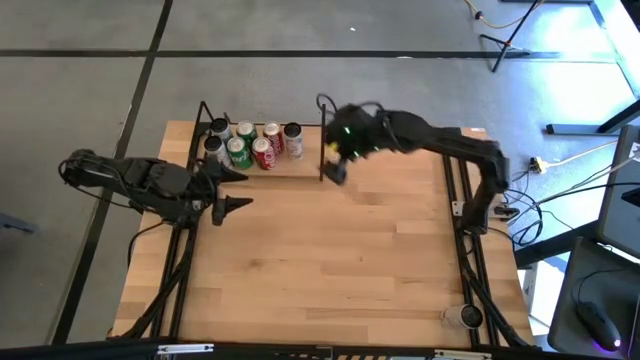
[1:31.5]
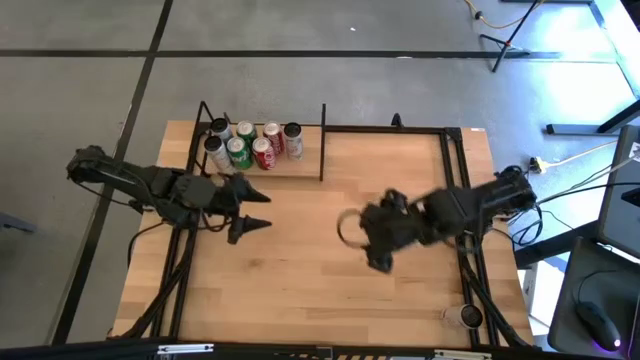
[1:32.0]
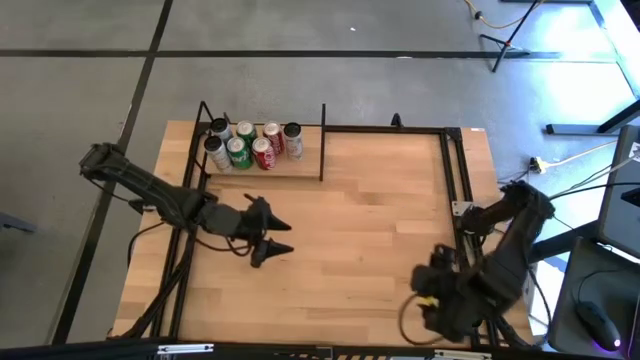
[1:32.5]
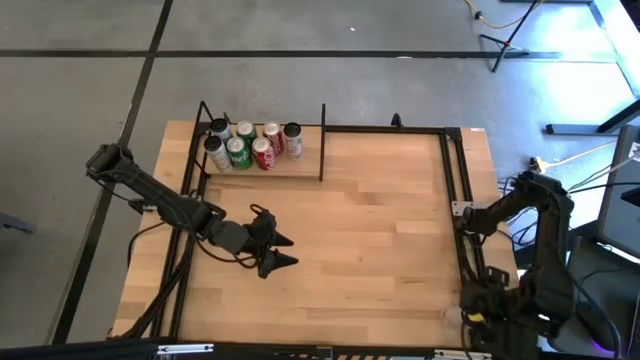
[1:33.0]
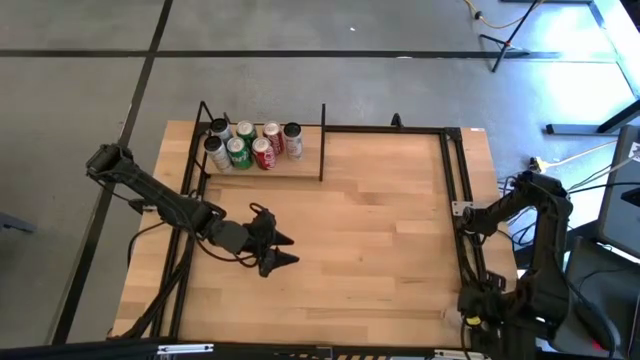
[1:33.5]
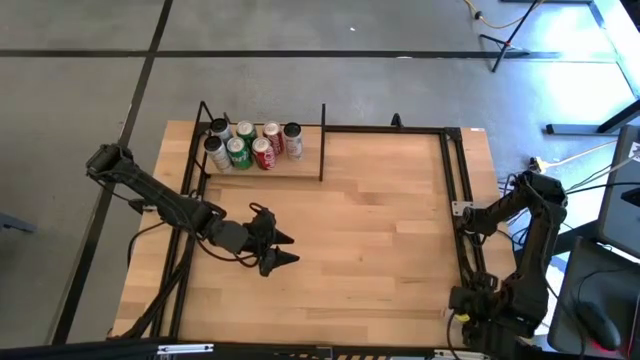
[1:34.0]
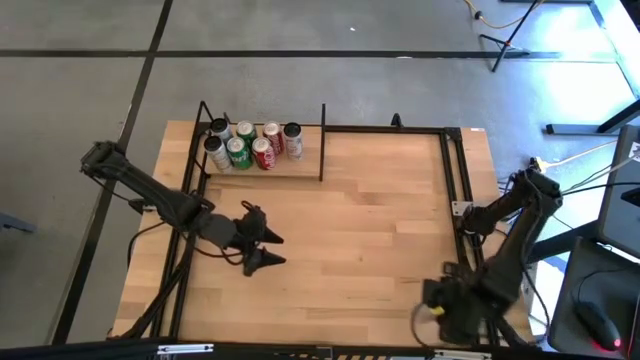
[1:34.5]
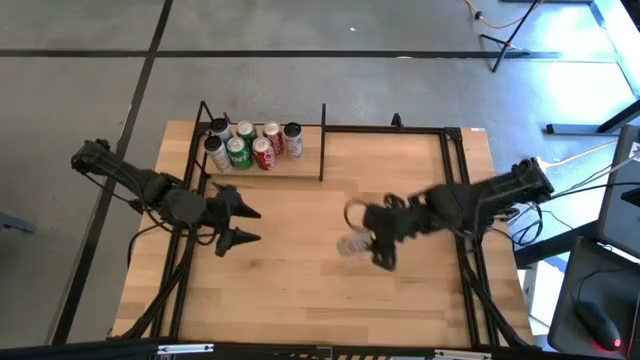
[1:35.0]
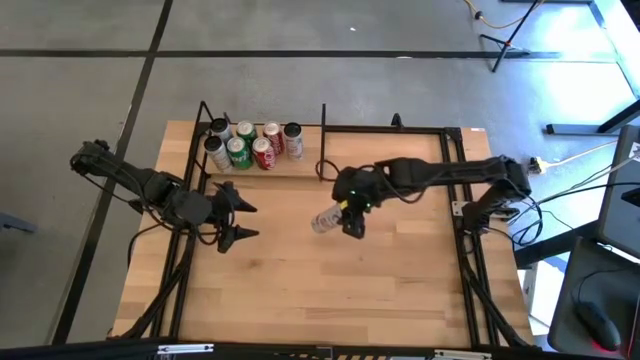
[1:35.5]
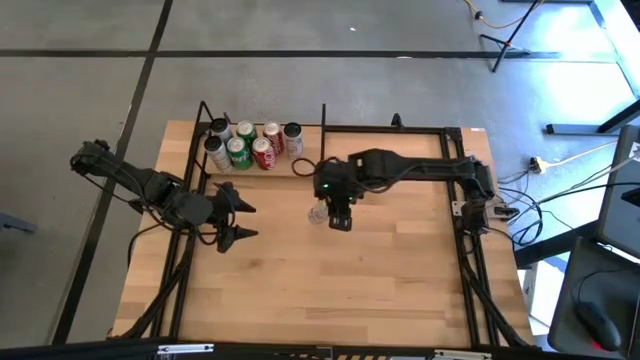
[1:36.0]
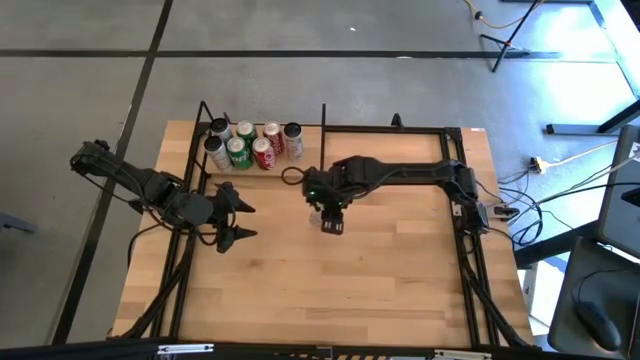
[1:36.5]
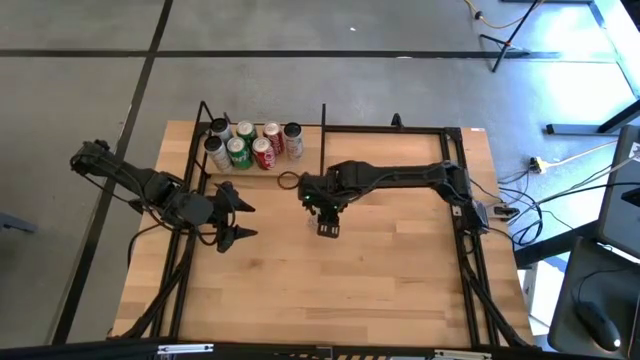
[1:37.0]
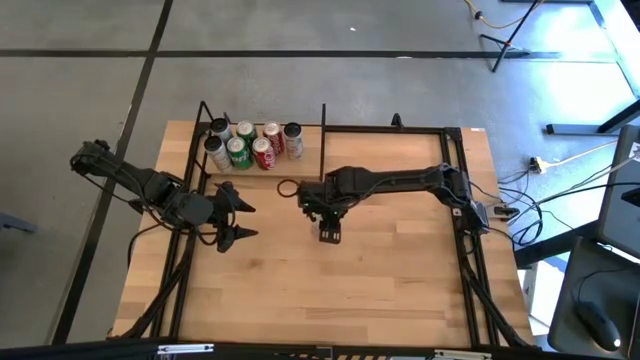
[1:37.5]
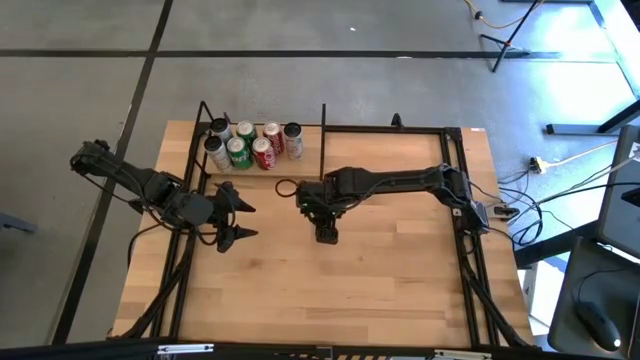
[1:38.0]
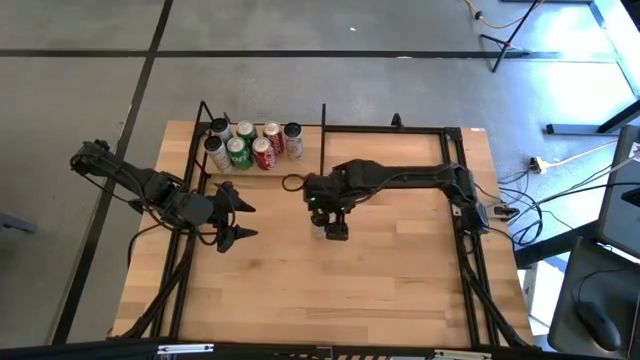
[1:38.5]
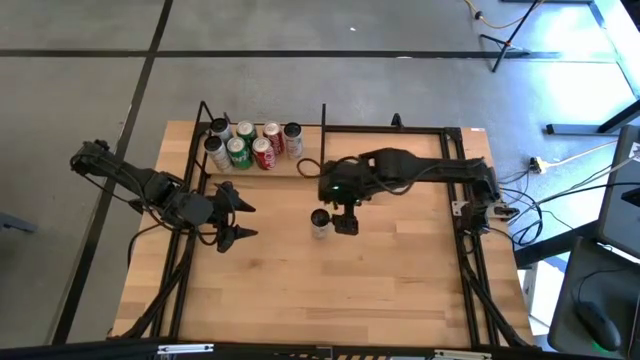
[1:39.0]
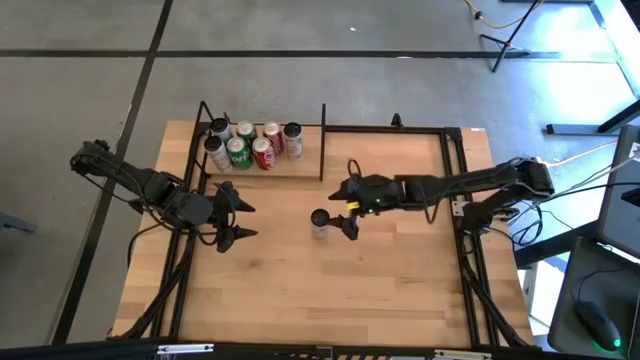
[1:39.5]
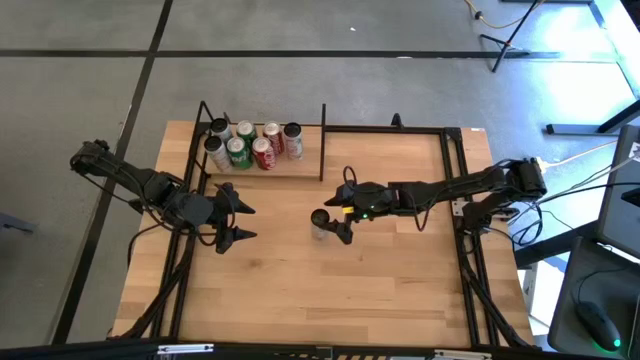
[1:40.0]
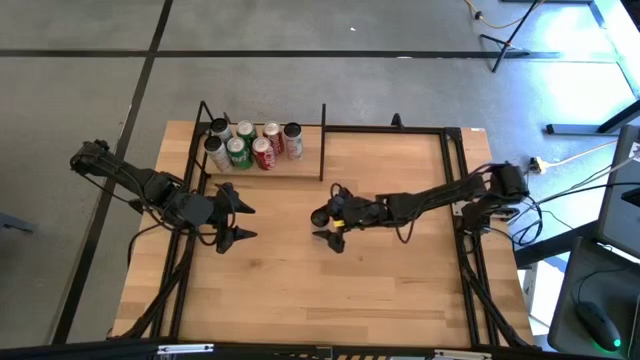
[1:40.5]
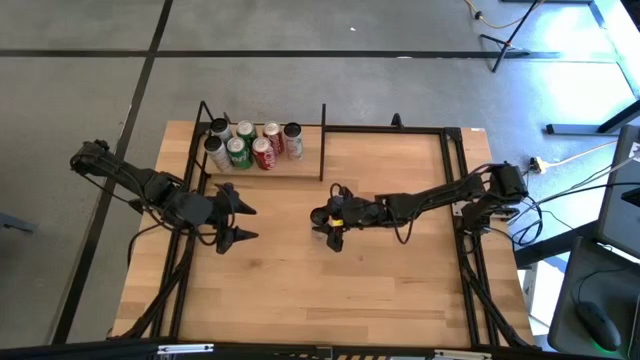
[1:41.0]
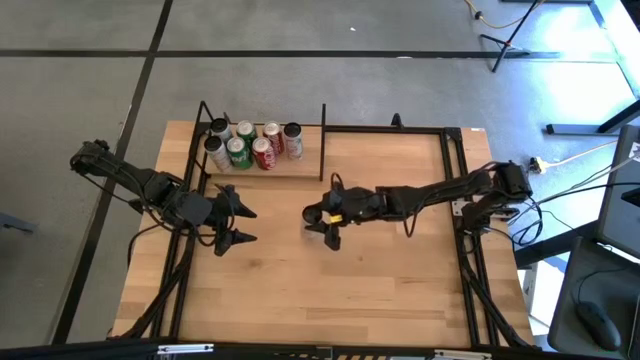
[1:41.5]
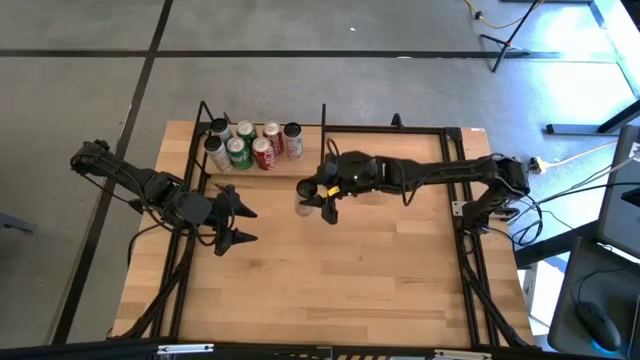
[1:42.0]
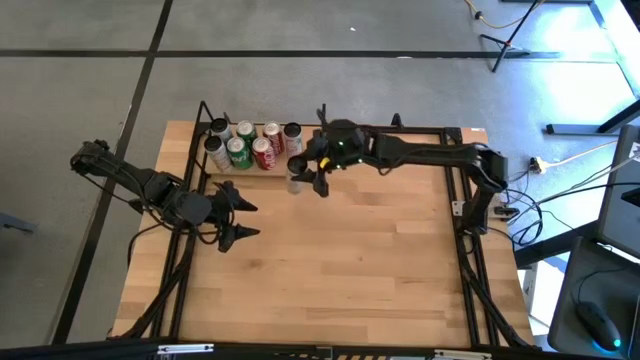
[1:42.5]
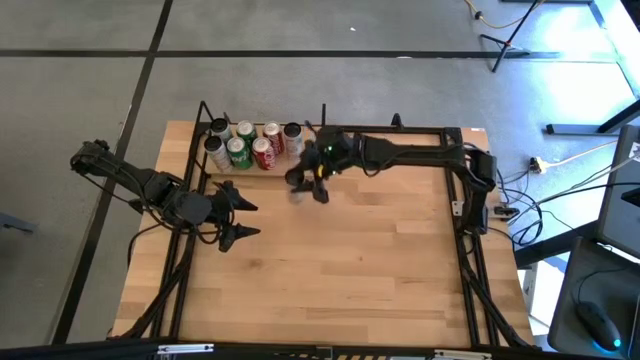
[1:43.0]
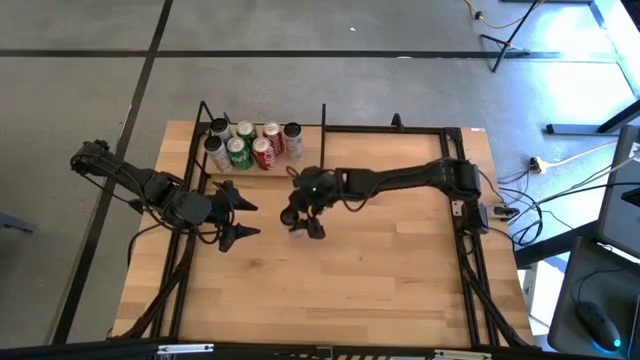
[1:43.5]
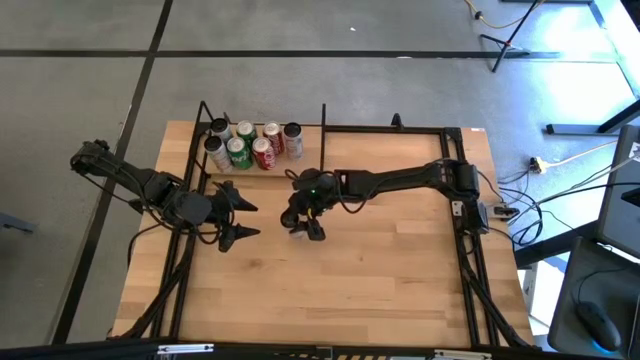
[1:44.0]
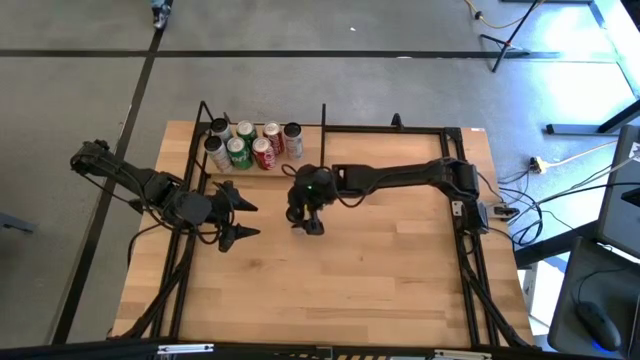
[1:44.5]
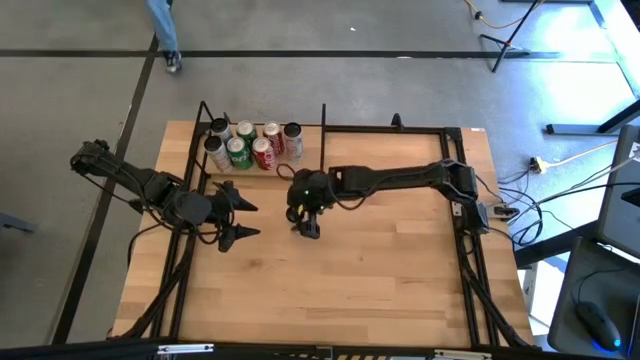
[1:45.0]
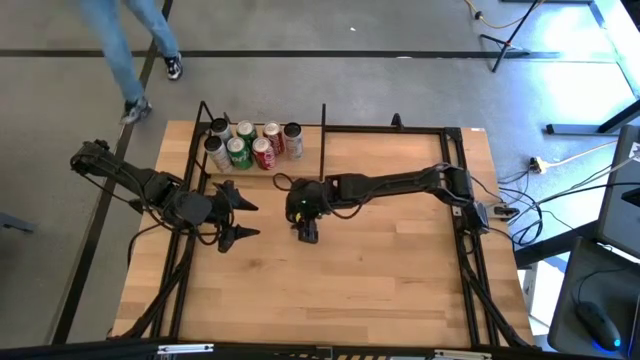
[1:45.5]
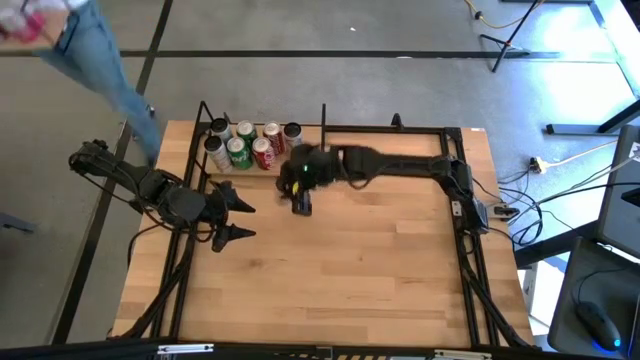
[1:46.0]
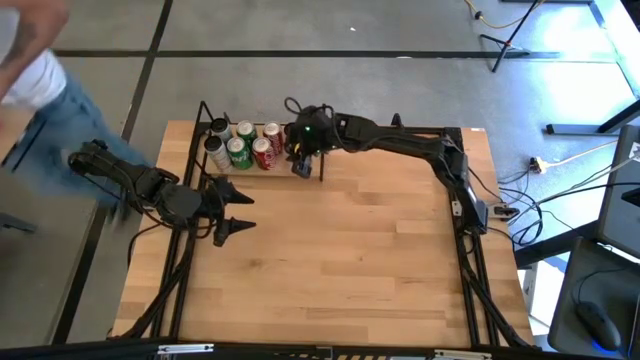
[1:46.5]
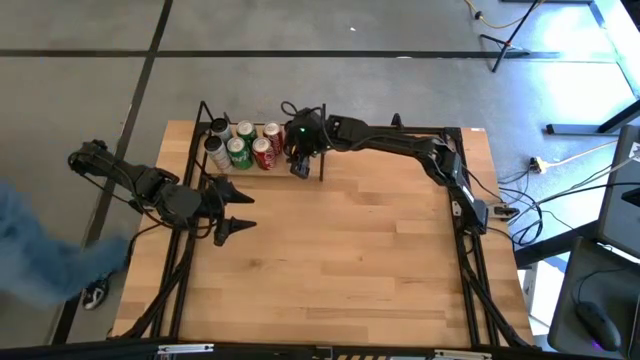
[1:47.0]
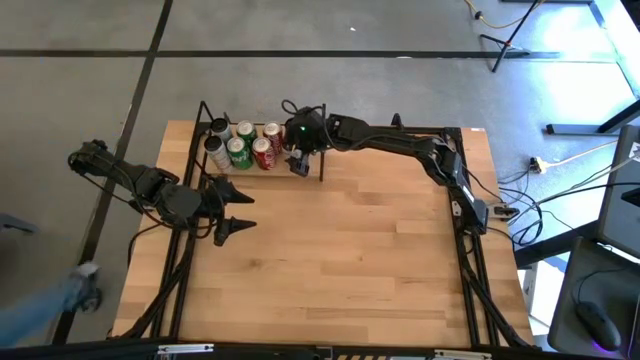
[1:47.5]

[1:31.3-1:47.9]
Task: Place canned beverage on shelf
Put the white-pink soda can on the shelf

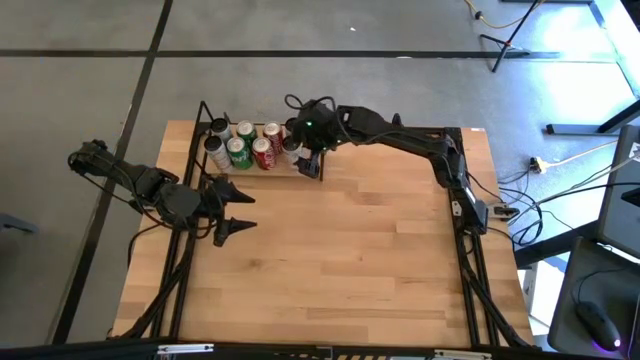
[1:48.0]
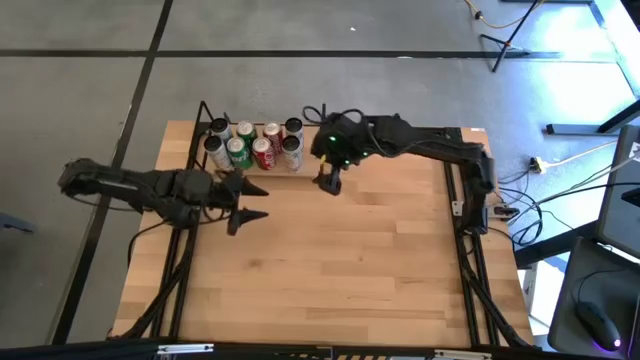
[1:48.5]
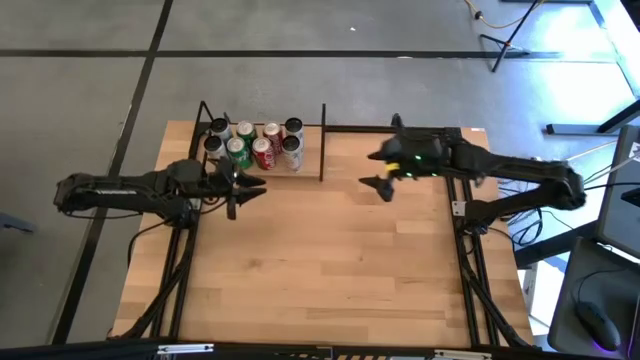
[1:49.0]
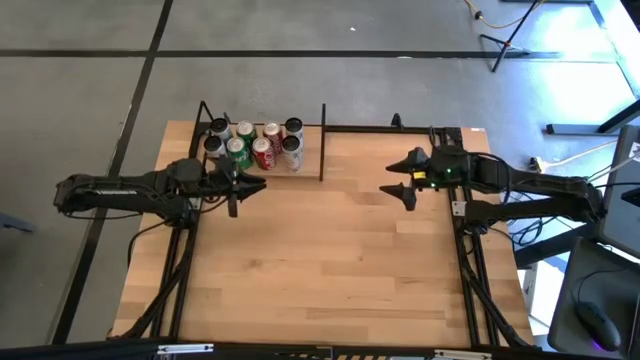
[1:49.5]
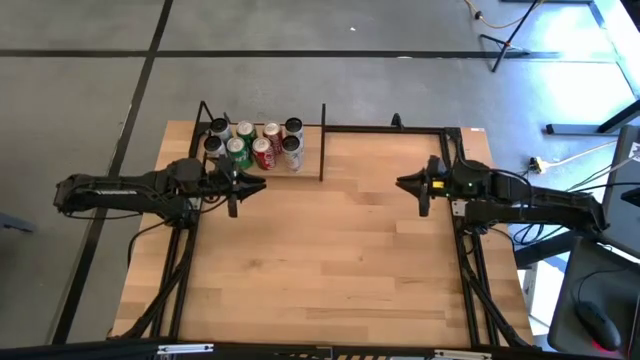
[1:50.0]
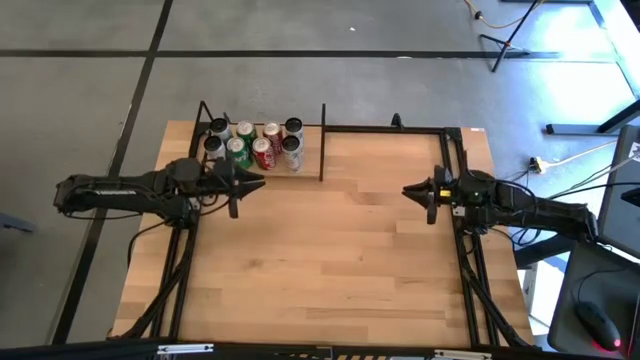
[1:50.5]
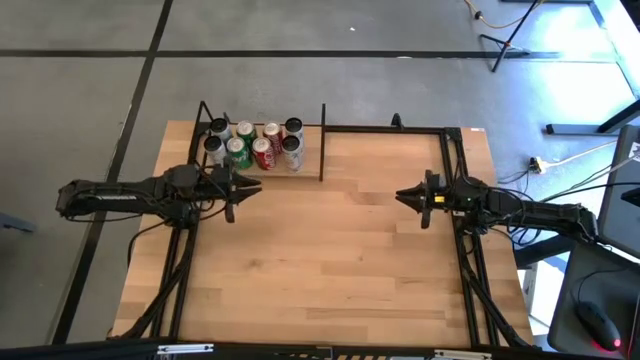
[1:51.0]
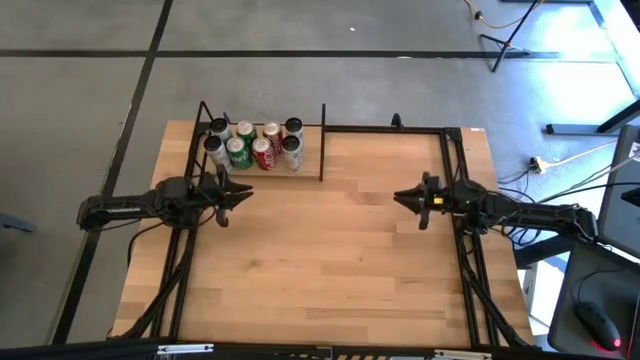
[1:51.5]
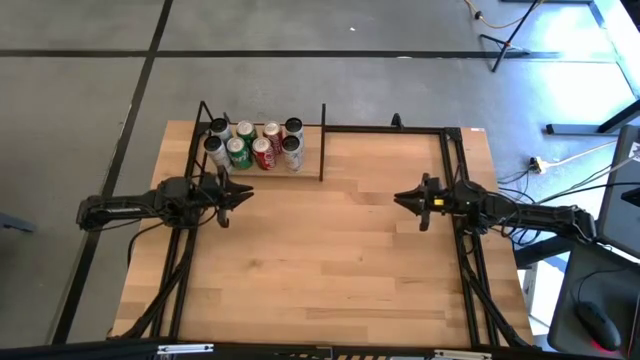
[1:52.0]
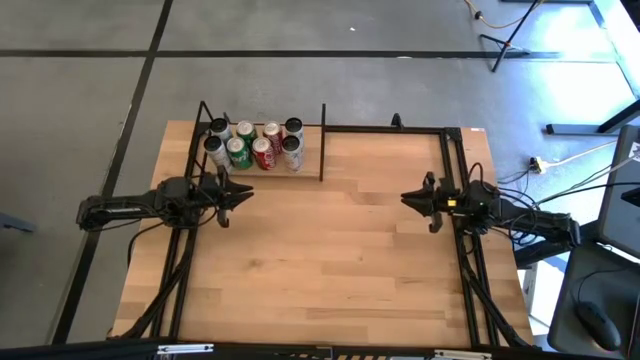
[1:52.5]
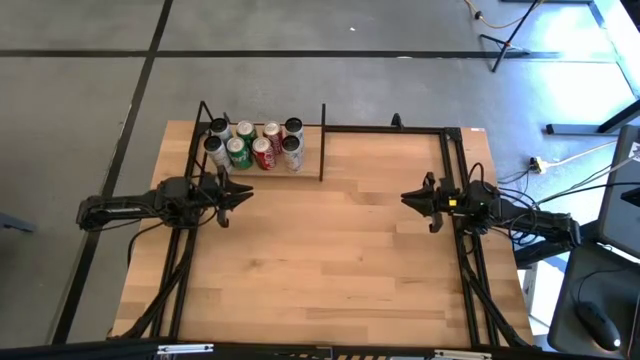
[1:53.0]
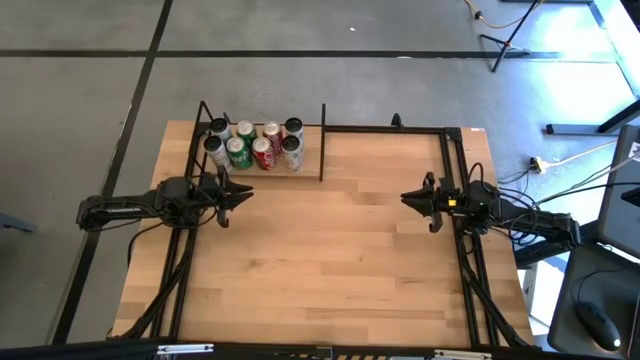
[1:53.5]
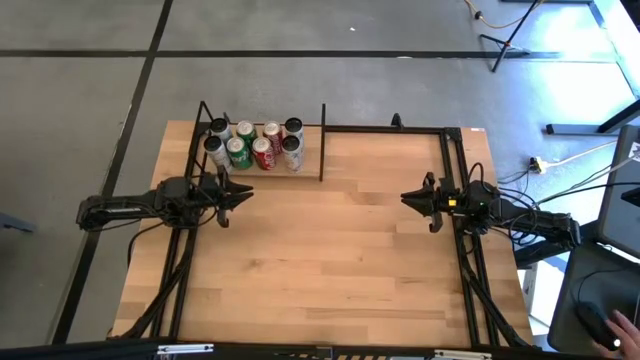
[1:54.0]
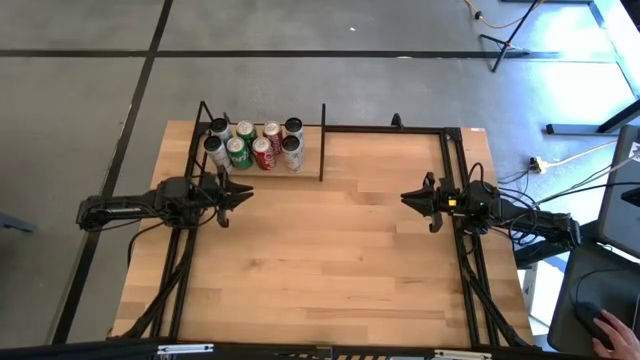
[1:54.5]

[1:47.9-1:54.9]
Return to Home Position
